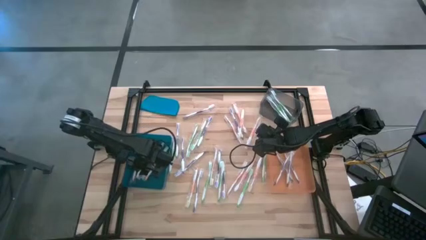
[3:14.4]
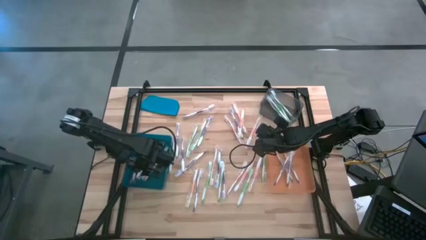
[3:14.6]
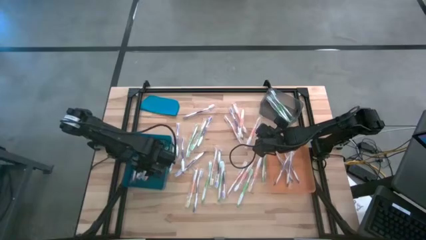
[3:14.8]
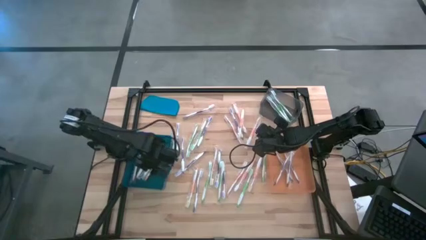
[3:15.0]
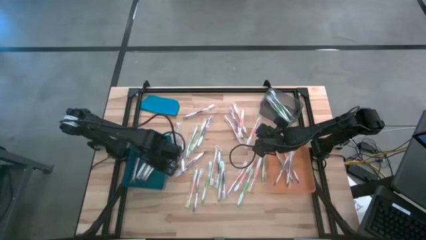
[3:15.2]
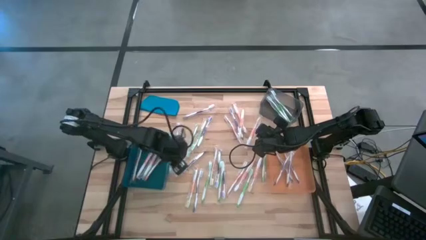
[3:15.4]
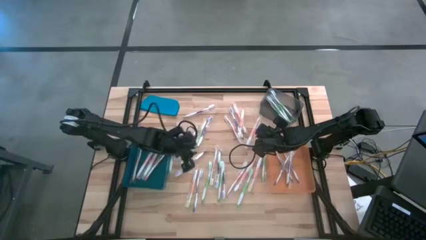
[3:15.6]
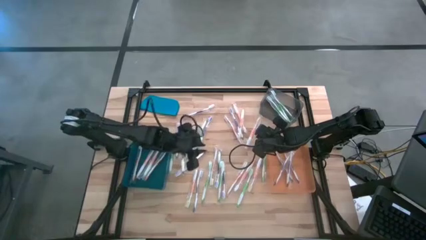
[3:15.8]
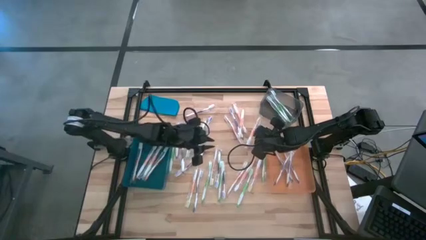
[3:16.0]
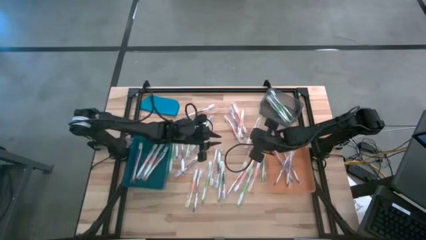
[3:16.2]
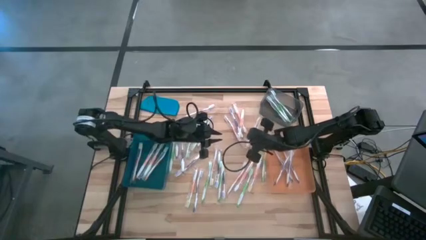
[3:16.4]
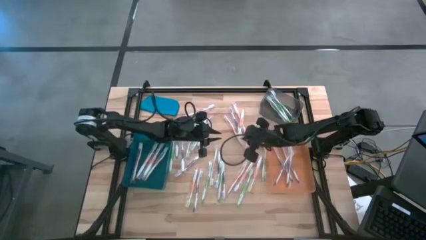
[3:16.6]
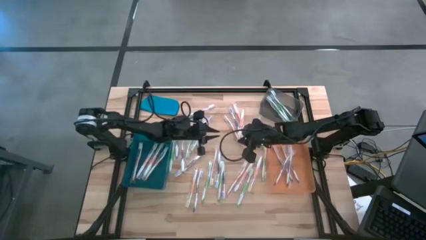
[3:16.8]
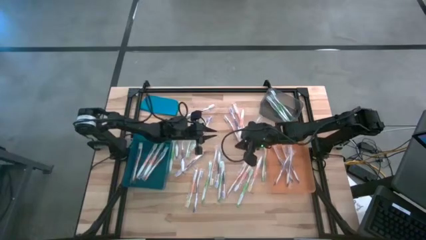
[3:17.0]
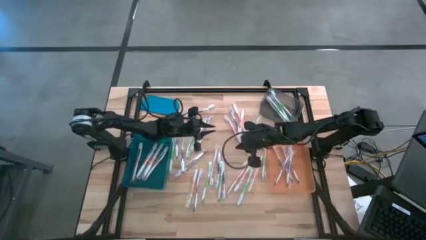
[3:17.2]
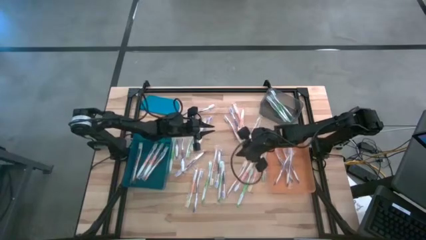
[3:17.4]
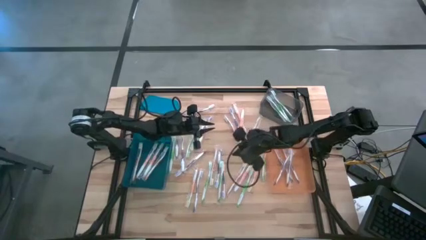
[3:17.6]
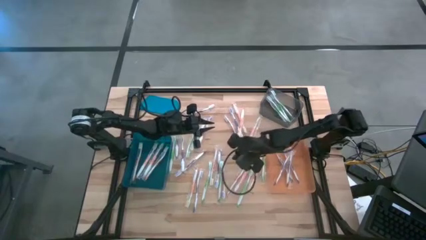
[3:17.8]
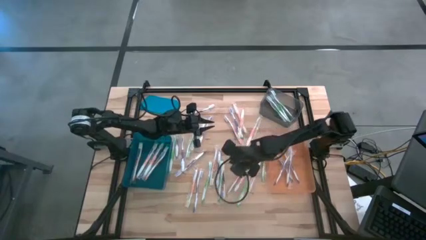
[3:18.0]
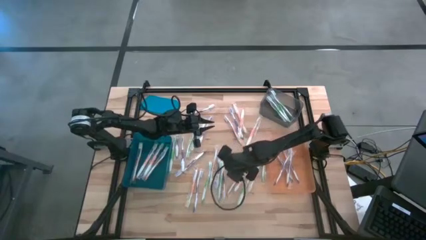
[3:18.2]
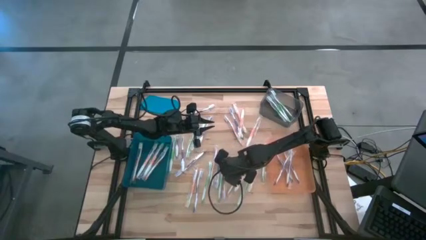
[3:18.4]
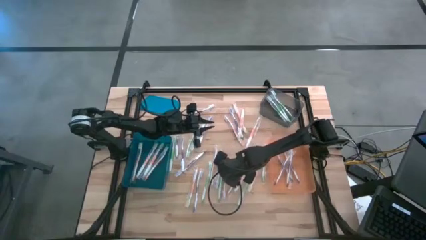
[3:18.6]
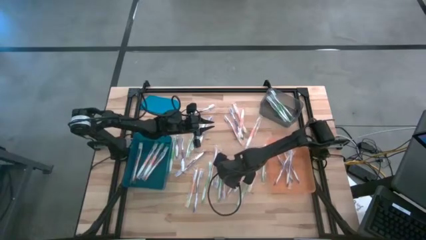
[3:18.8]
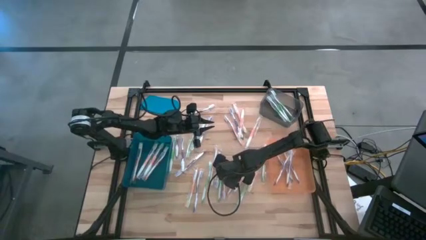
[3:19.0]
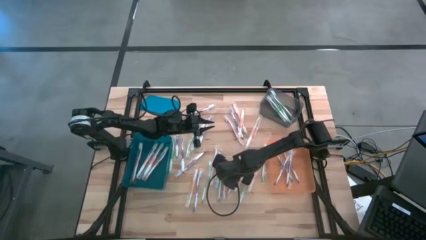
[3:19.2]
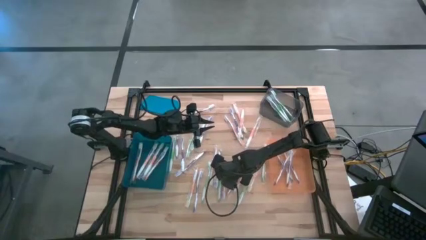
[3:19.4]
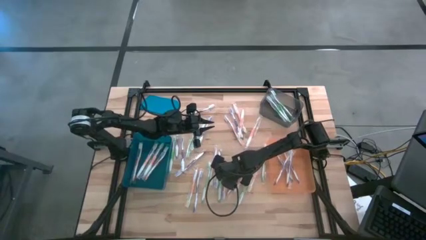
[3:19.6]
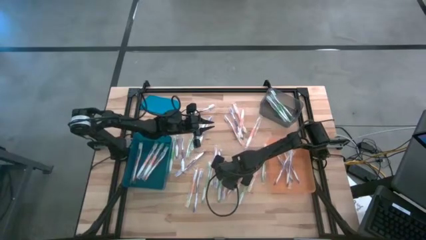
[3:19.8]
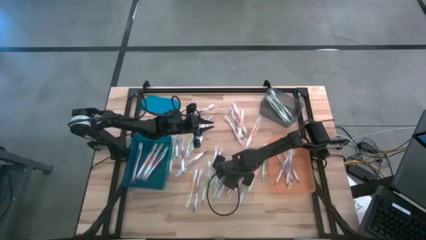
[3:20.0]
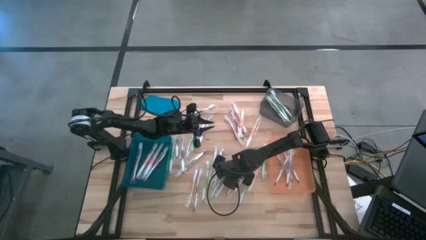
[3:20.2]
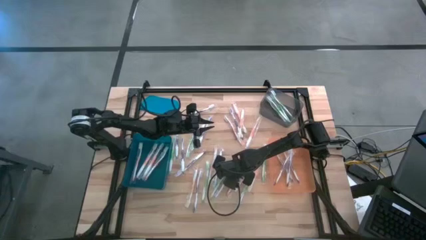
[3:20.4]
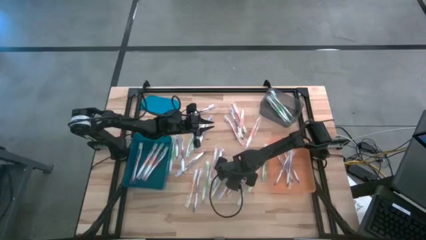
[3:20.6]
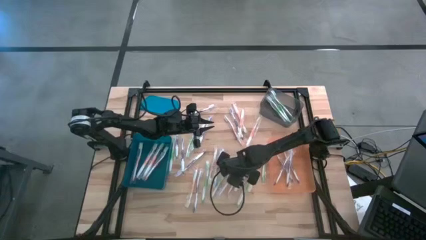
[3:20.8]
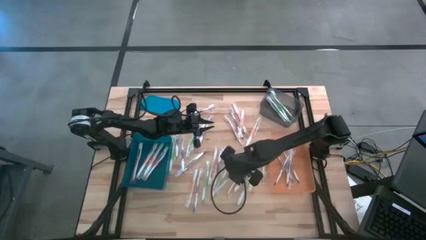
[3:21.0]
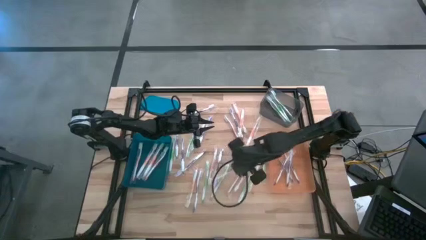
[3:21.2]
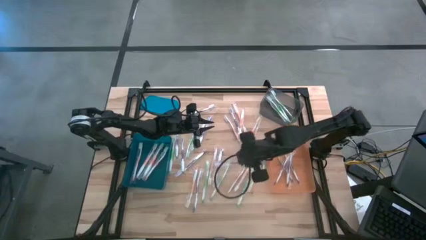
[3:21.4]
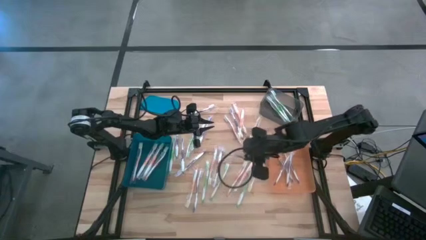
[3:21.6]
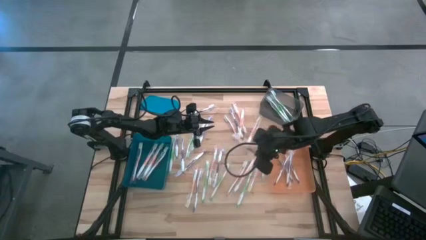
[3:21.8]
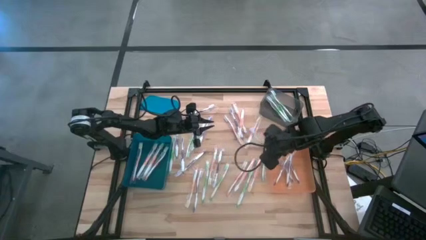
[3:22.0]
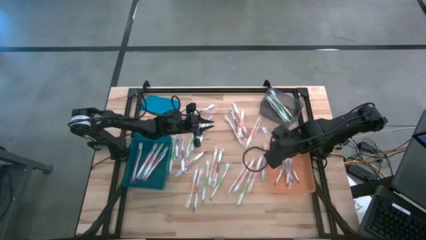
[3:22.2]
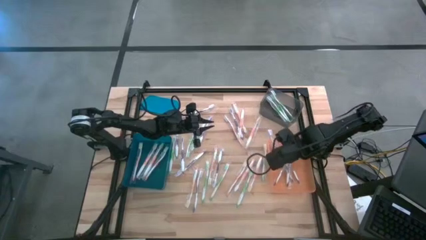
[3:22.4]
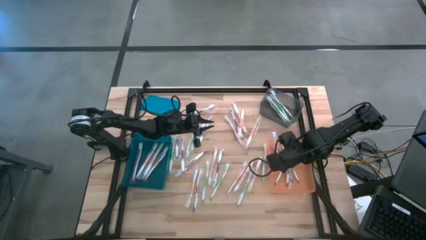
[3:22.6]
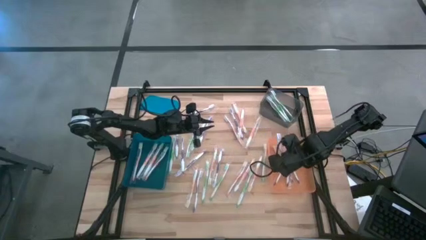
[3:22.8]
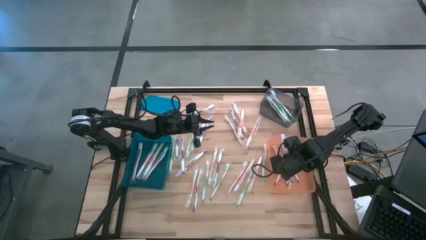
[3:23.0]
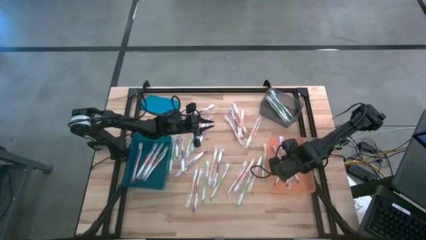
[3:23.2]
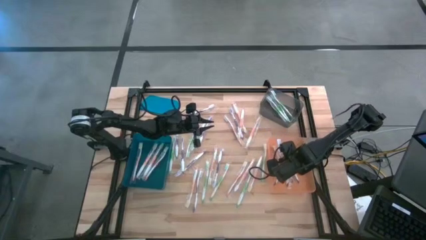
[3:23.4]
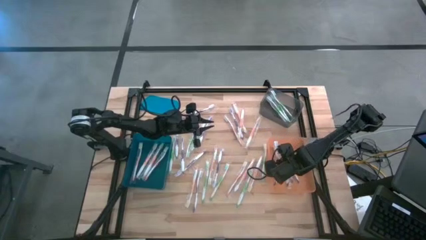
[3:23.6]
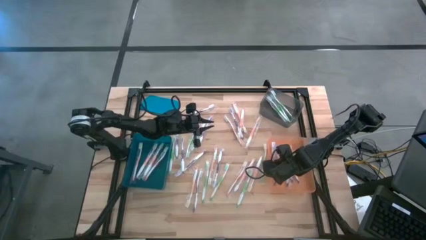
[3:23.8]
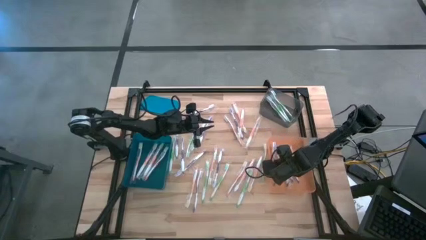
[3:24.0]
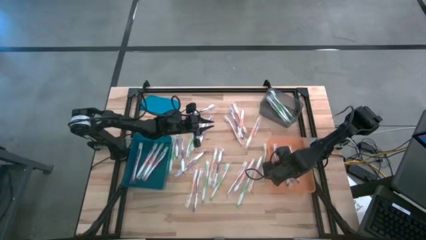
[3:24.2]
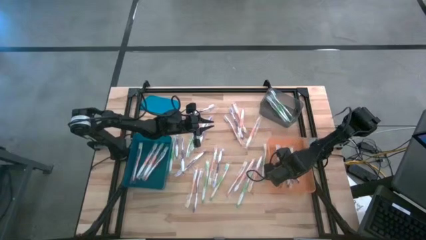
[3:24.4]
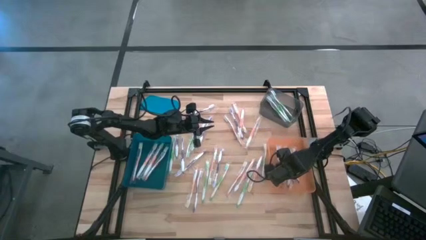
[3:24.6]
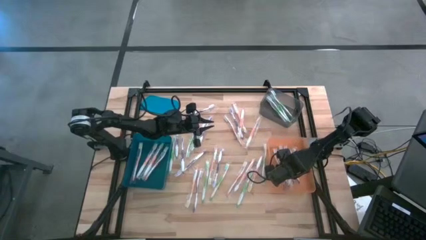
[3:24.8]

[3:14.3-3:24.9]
Task: Pick & Place Toothbrushes
Put the purple toothbrush into the orange bin

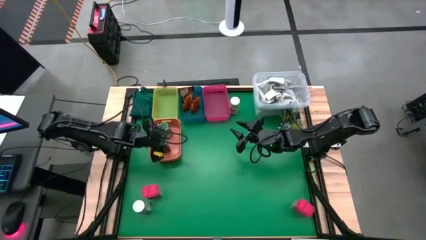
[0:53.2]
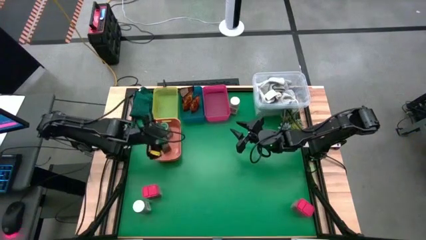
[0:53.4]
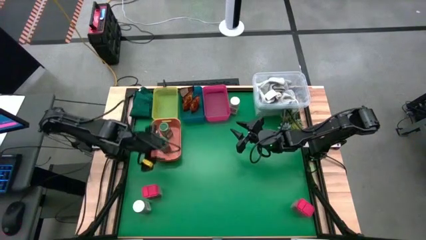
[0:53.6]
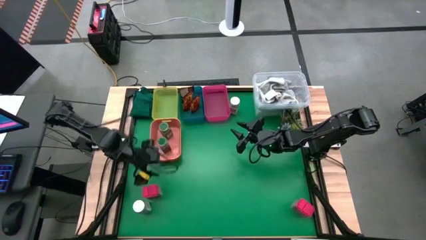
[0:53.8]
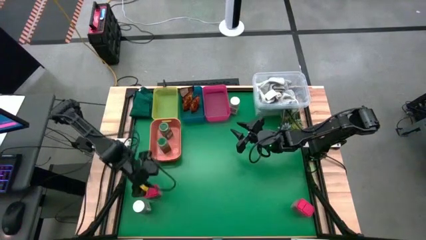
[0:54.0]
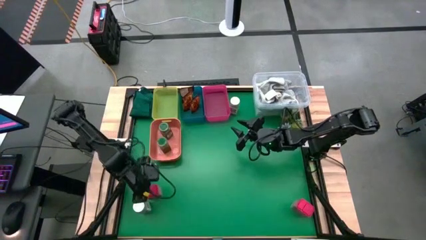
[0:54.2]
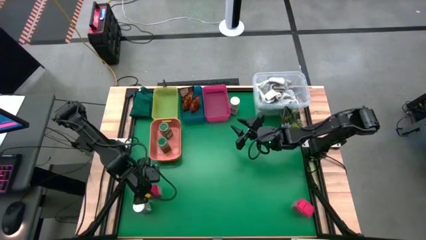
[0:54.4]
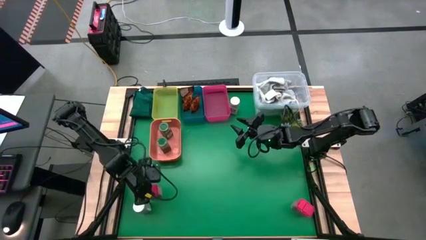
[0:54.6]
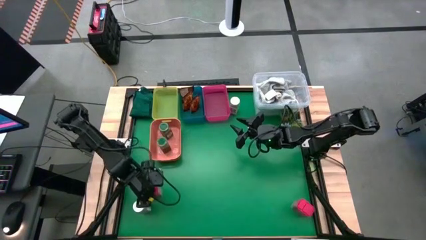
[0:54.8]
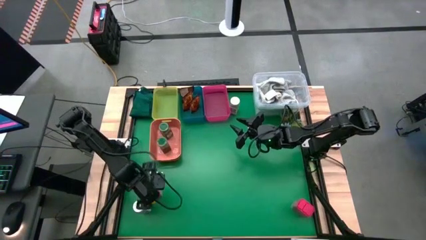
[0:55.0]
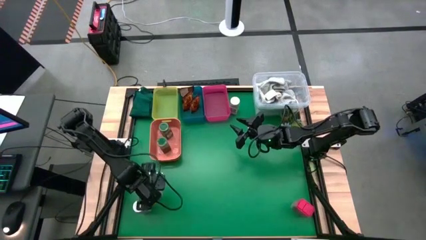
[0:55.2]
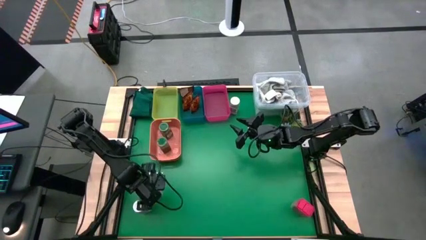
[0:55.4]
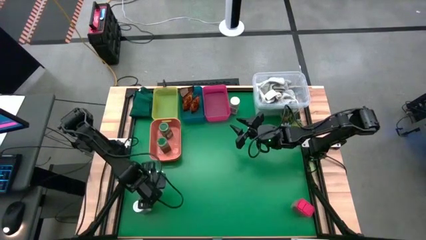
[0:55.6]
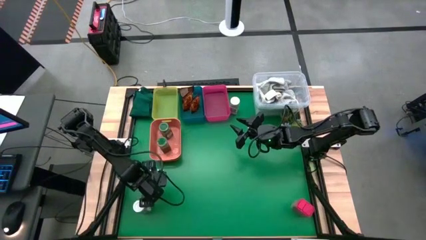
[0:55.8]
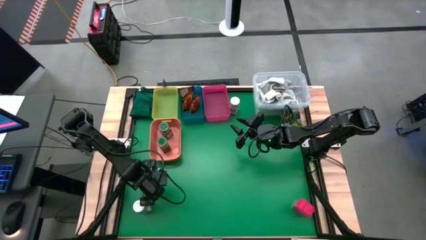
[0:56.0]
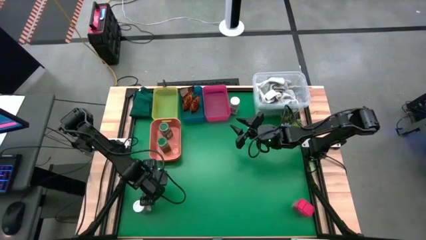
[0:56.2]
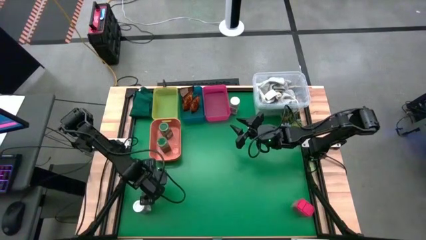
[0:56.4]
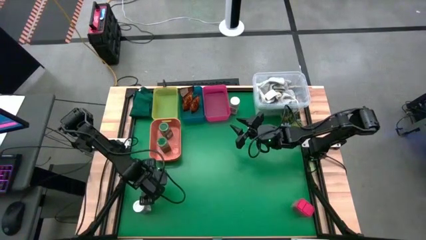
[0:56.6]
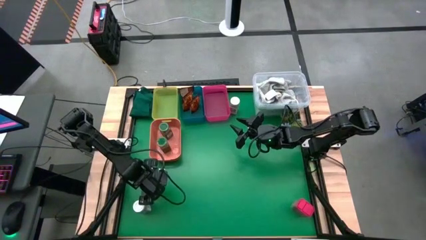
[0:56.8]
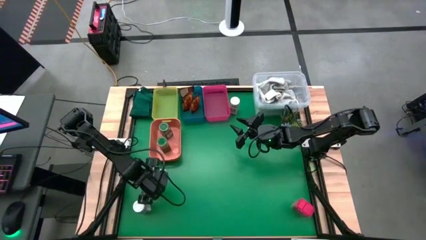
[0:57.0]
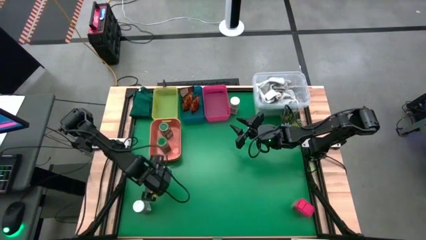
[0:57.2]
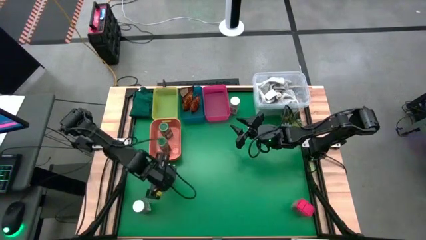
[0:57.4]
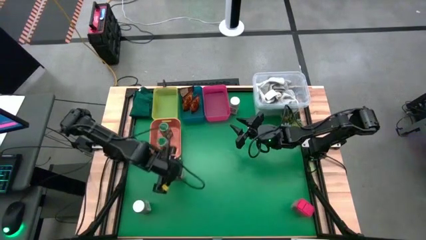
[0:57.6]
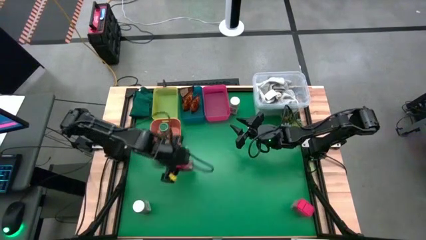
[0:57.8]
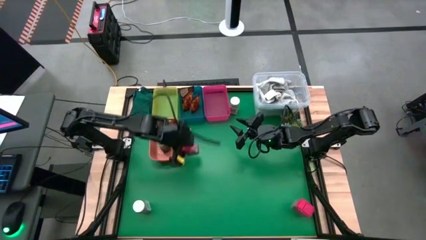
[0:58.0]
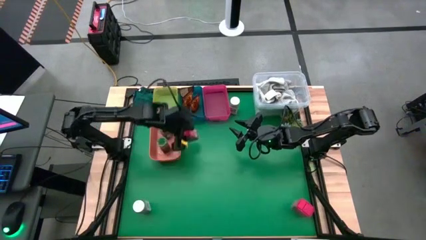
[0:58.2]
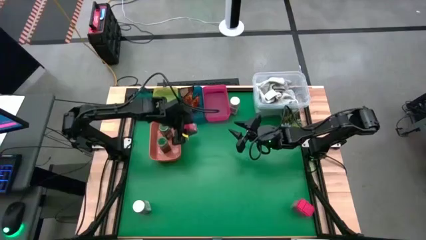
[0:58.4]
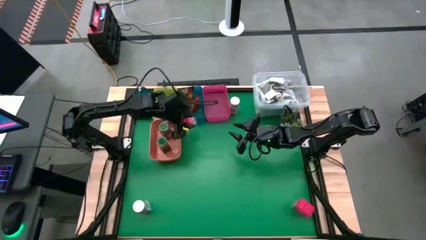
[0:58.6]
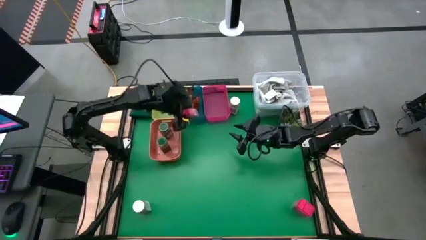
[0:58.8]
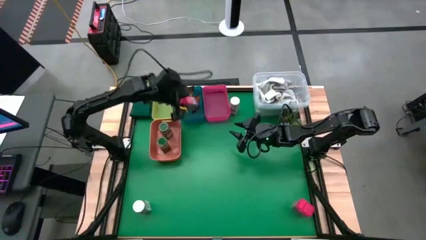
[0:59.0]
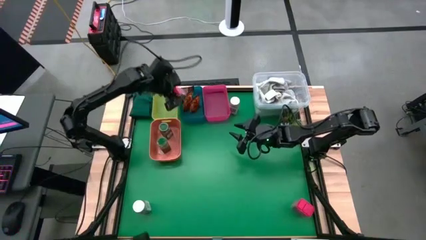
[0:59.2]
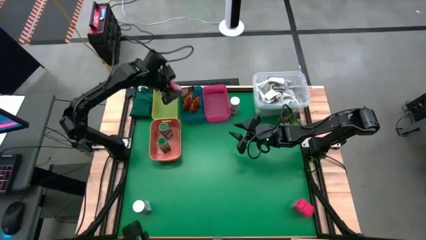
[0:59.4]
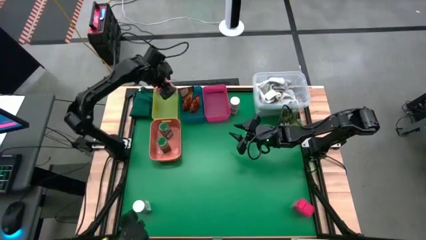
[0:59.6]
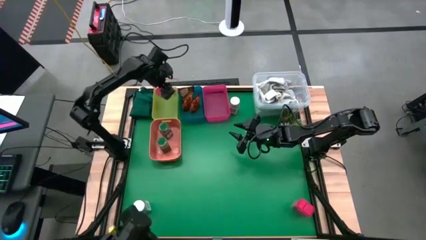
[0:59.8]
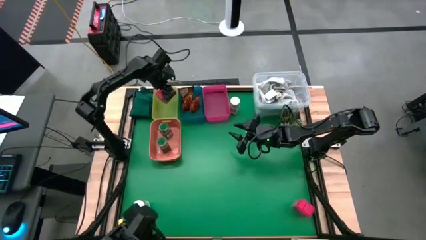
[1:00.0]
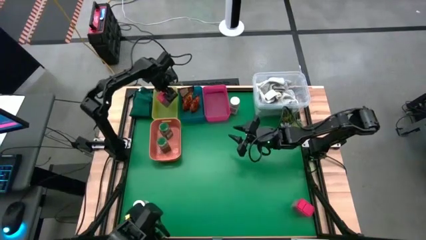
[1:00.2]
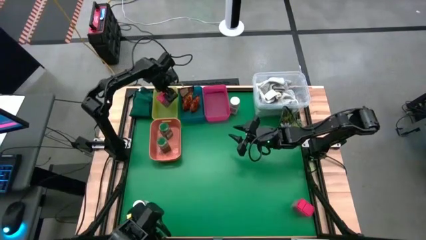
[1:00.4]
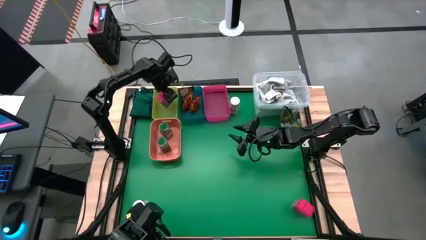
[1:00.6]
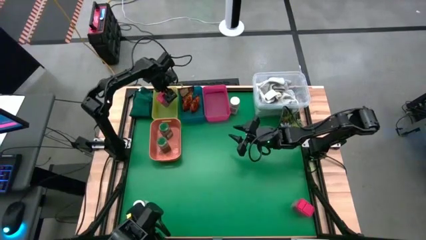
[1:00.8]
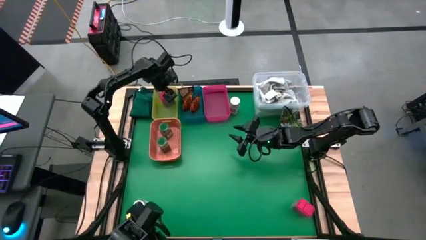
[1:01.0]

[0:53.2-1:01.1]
Task: Sort spices by type
Put the left red seasoning can into the green bin
